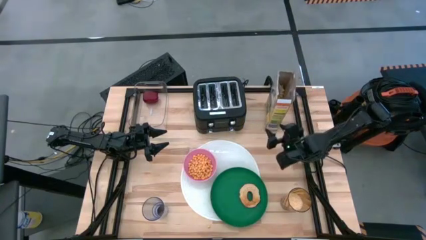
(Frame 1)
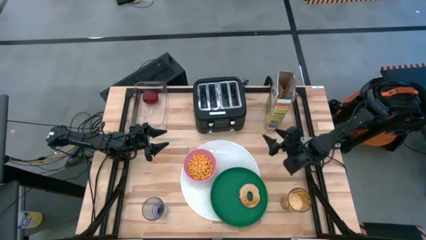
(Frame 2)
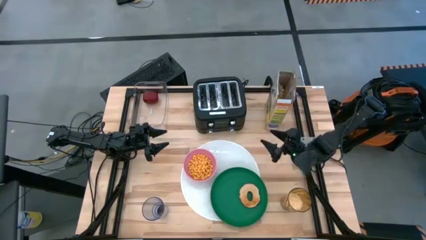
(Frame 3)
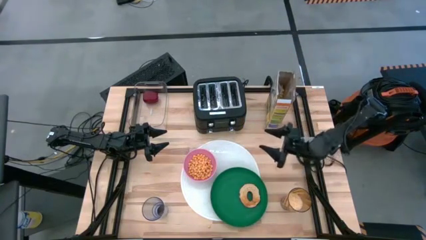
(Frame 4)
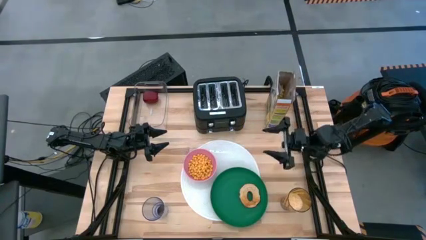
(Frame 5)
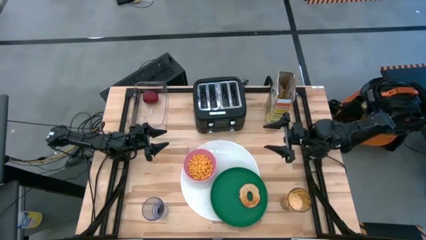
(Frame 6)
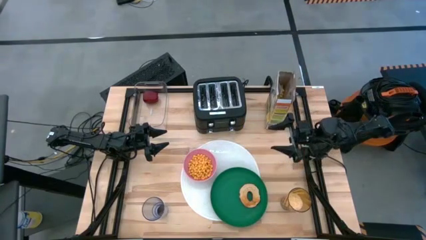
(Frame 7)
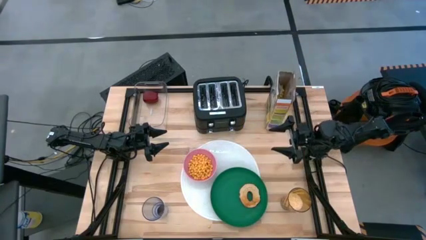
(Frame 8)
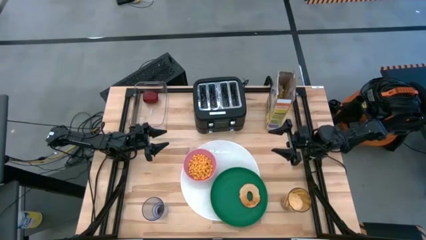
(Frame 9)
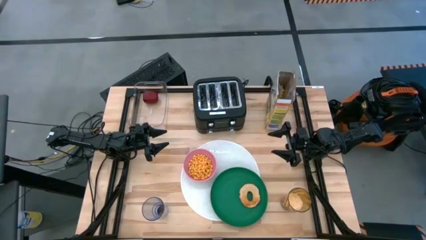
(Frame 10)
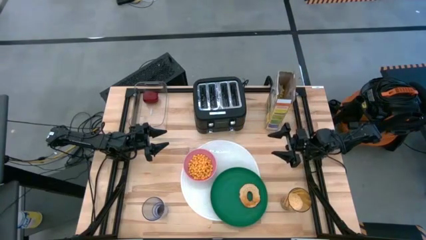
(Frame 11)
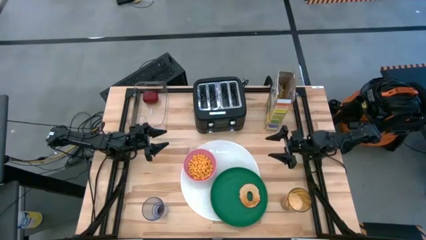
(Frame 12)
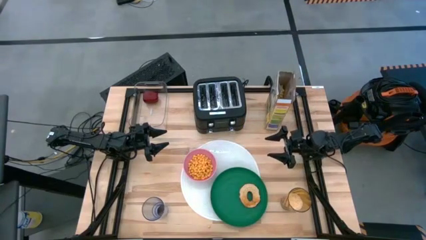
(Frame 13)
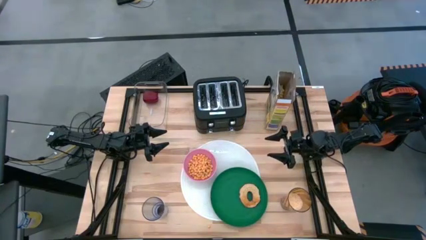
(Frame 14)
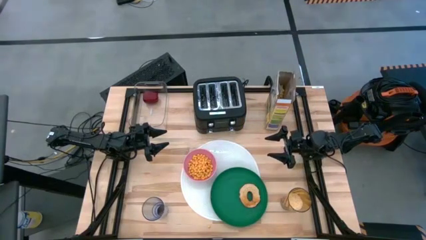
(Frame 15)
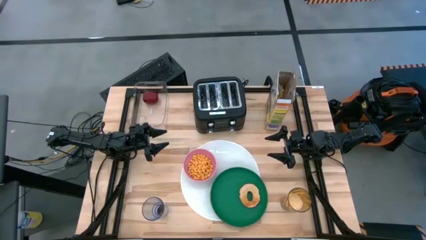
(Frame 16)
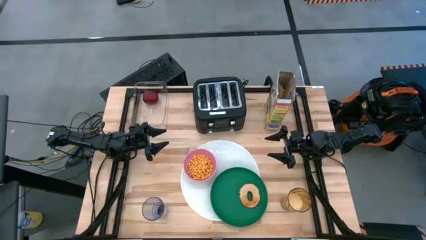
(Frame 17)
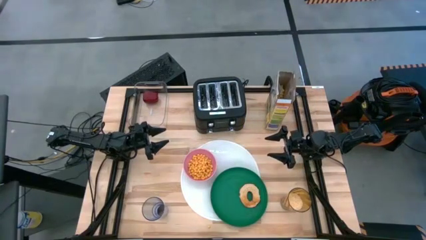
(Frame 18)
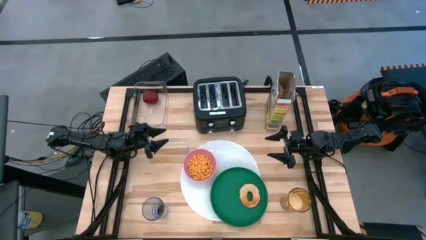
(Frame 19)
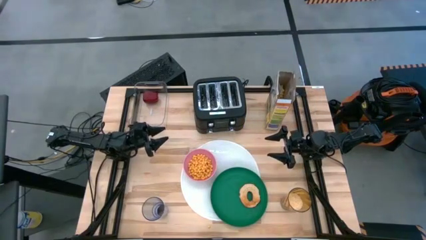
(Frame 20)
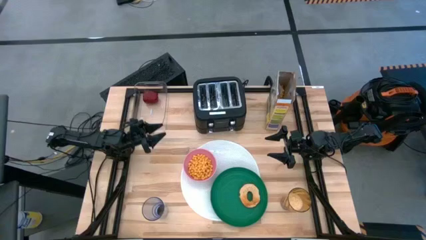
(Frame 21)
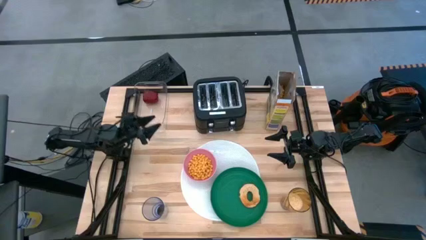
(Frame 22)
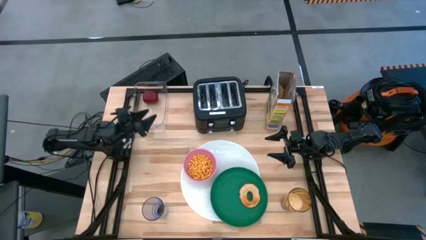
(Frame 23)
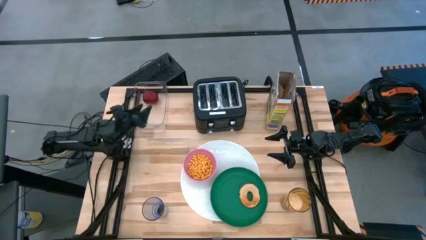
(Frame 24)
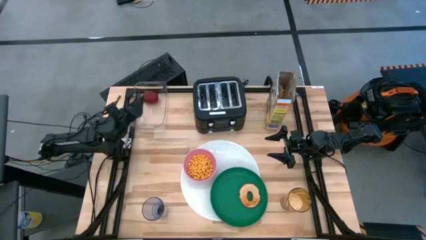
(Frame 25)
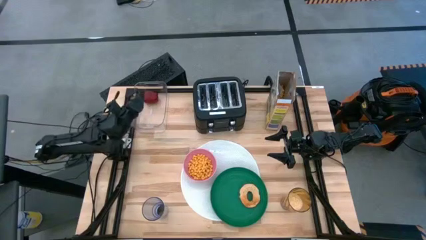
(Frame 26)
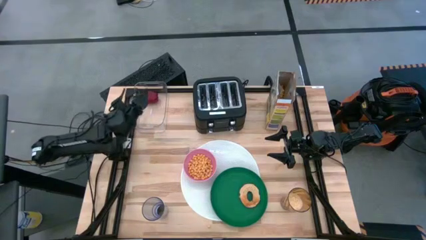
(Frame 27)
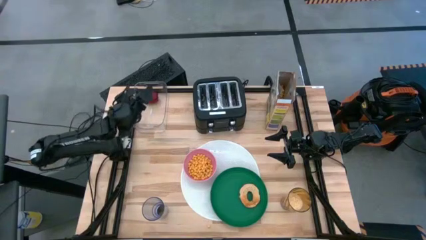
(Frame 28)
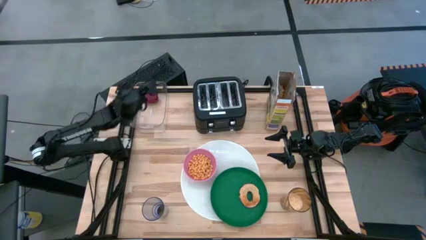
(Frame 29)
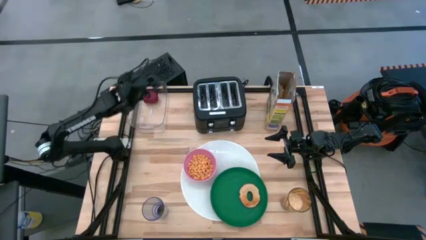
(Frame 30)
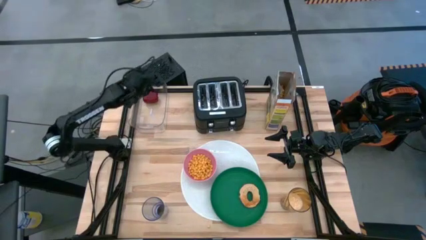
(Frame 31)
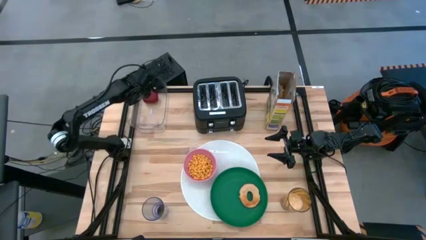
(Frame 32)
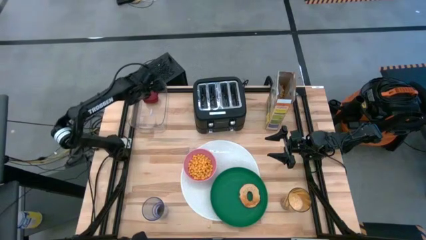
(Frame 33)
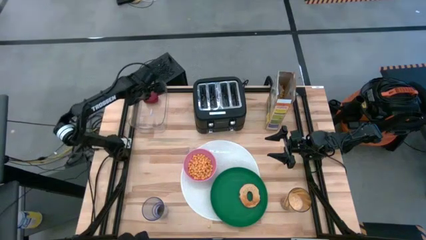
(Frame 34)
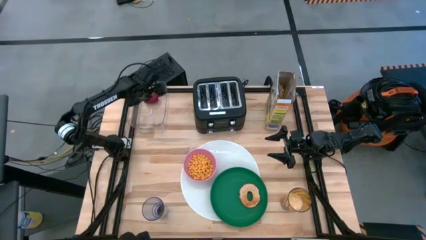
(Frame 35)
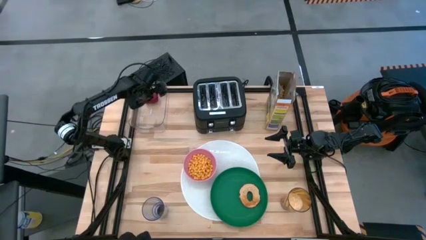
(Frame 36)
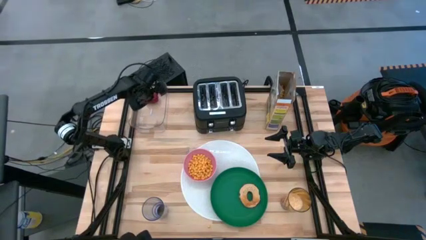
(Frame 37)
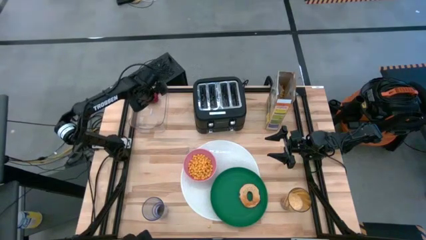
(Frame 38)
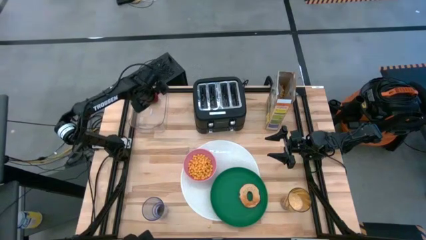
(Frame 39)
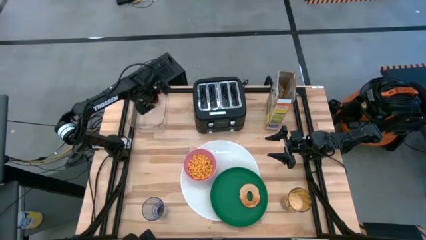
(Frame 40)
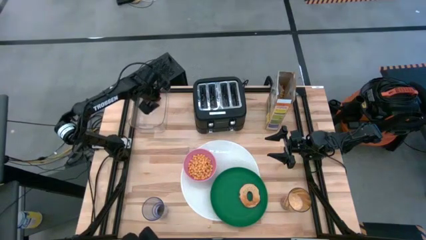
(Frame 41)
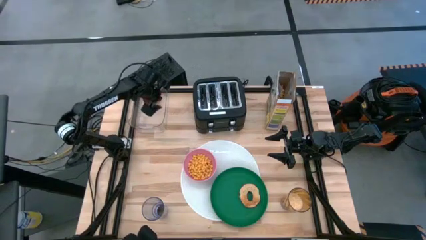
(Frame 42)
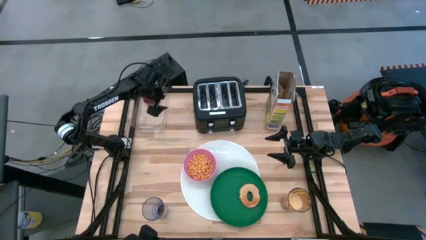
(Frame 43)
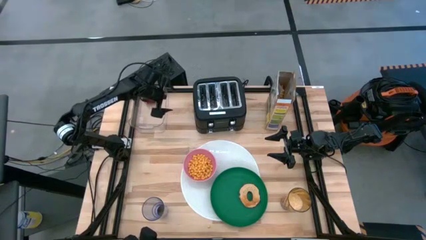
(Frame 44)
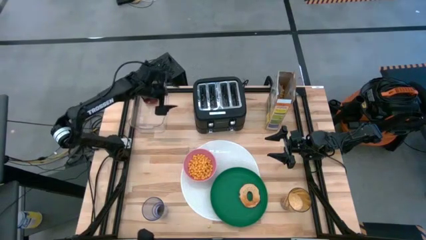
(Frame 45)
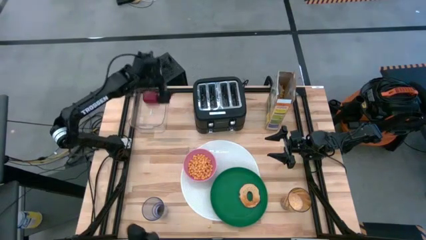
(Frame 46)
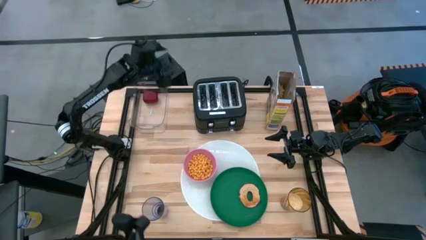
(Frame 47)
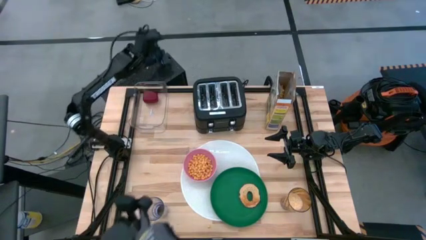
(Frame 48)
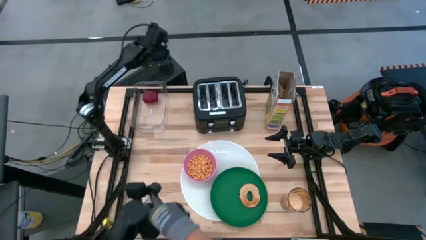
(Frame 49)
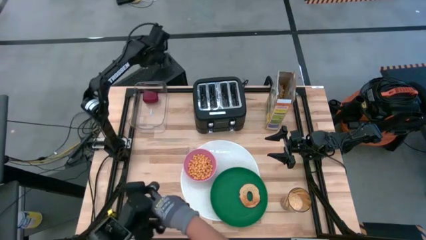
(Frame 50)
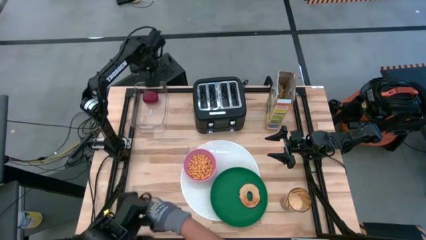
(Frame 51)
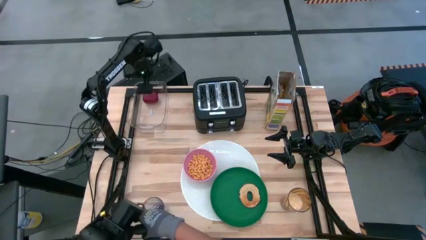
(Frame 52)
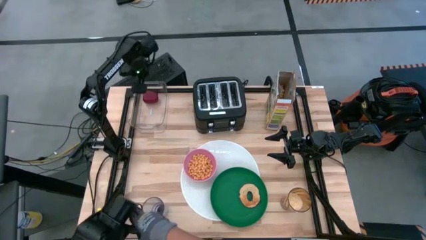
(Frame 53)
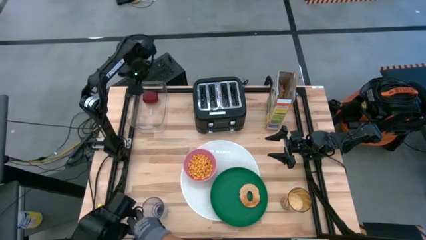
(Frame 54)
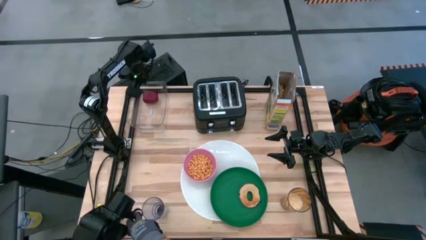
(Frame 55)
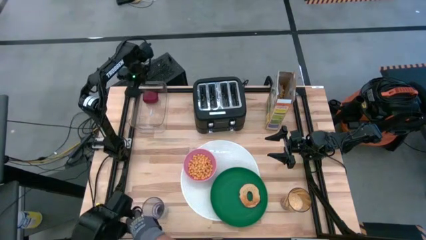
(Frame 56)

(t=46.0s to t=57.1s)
Task: Arrange a breakfast setting
Put the red apple on the green plate

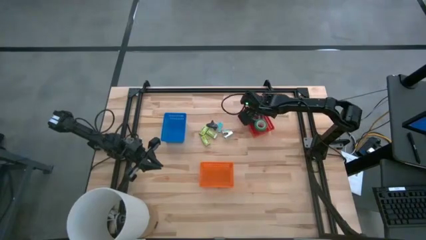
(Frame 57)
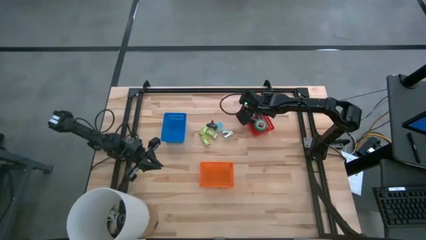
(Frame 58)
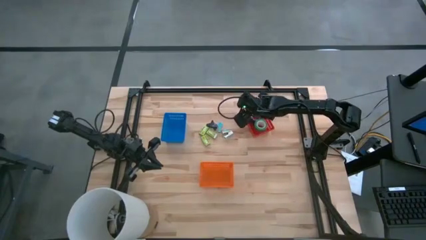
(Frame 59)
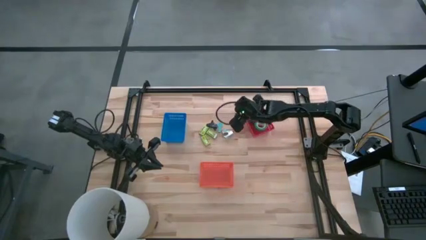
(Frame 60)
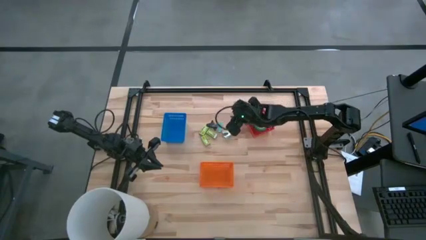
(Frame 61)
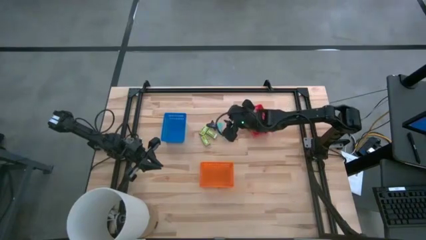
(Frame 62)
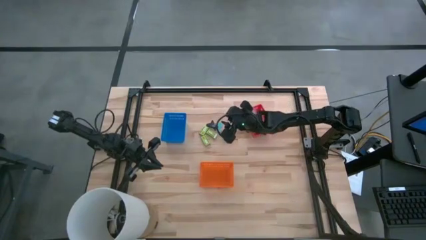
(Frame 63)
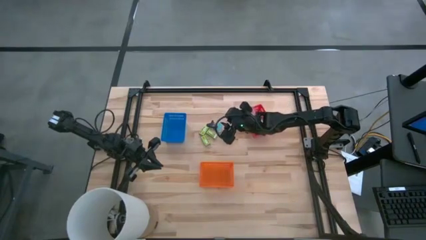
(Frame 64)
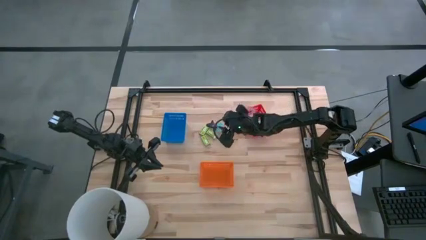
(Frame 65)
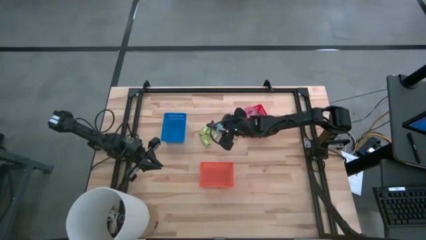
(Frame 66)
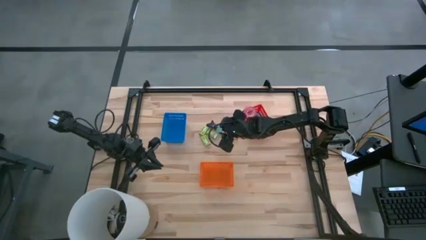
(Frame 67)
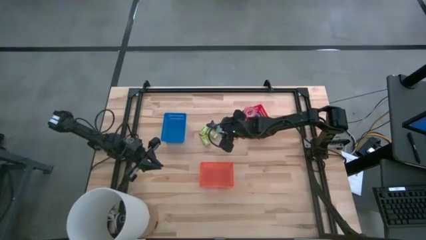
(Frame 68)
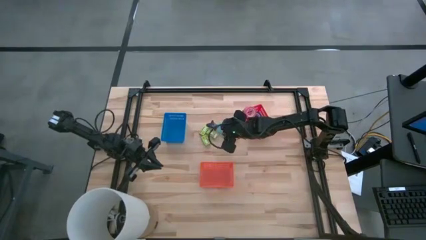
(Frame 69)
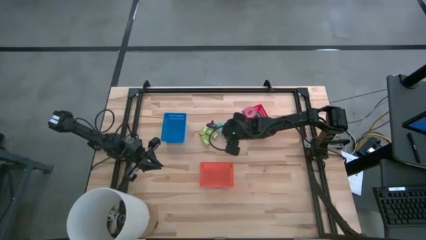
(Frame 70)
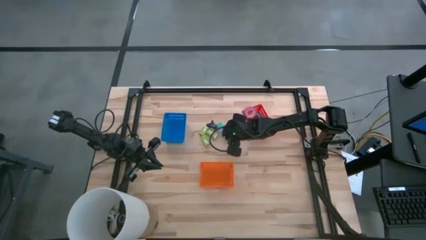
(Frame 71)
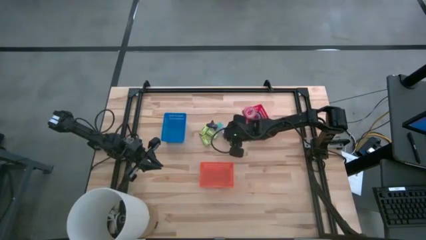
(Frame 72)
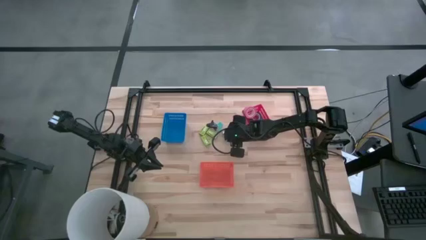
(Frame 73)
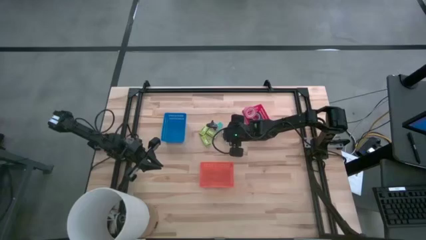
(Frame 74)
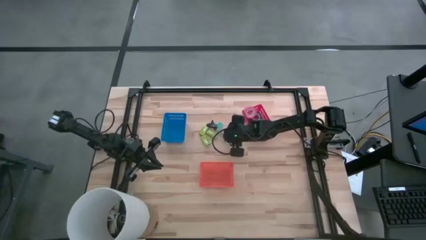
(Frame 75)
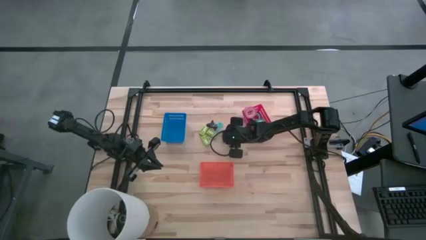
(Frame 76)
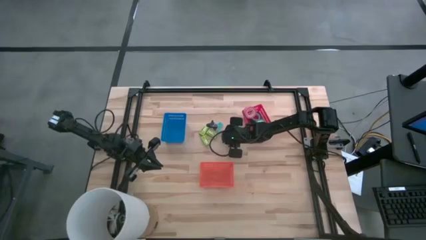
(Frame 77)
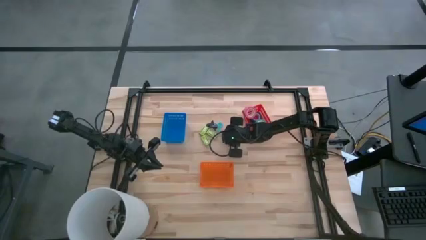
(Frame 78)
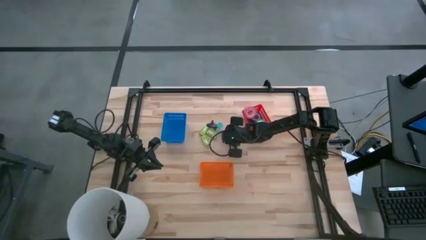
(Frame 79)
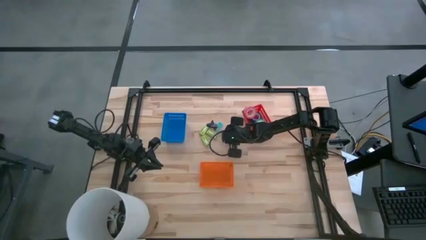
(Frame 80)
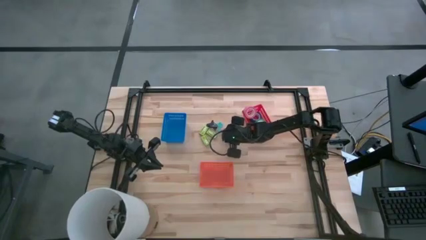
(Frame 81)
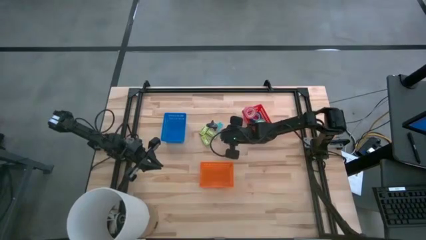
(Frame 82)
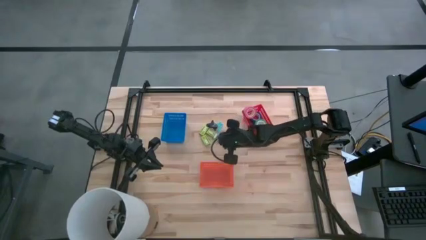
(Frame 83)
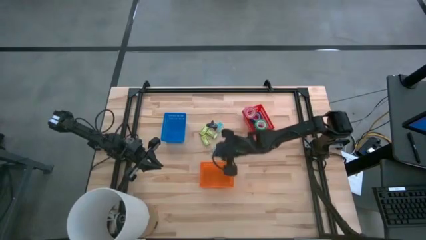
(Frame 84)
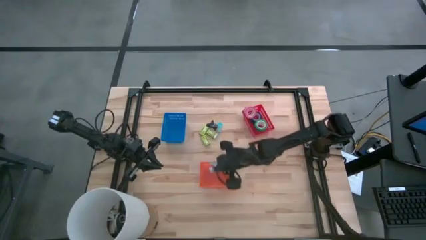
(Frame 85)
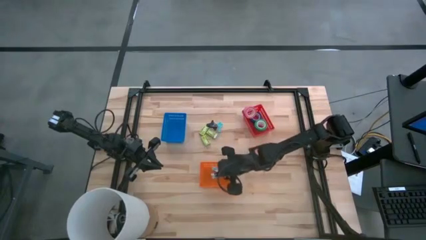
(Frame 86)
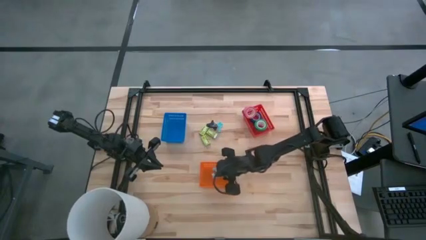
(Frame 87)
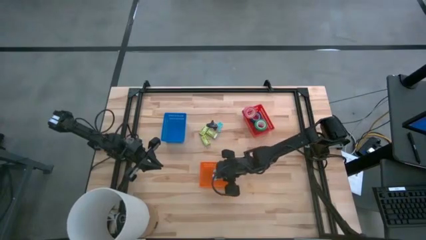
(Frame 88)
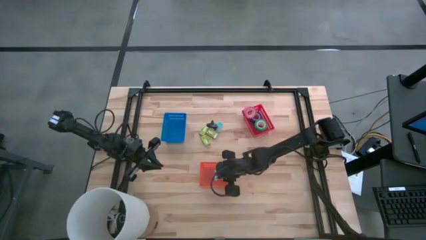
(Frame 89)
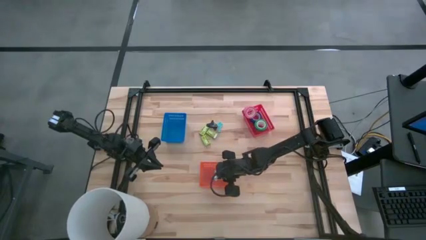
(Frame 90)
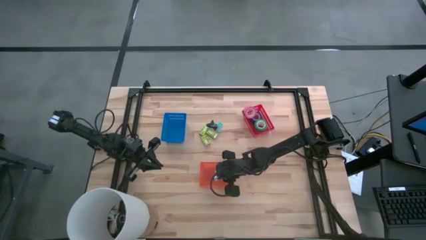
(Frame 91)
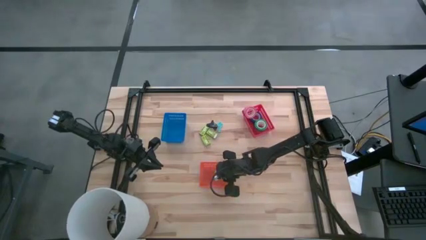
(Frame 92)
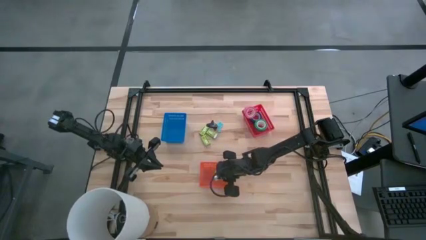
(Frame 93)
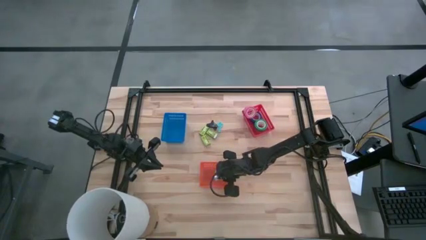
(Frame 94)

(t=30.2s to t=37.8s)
Task: Pick and place Stapler, Stapler remover, tape
Put the bottom blue stapler remover into the orange basket
